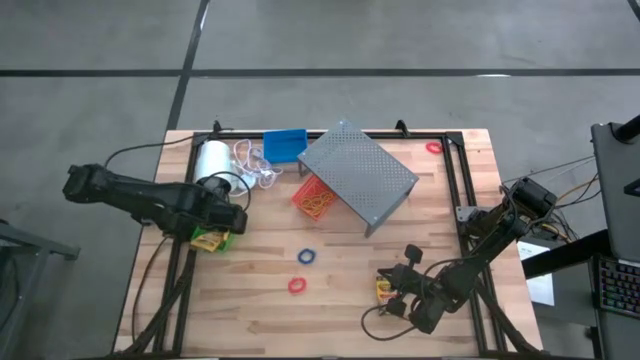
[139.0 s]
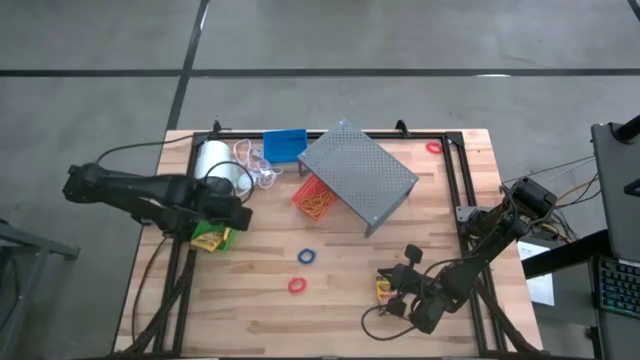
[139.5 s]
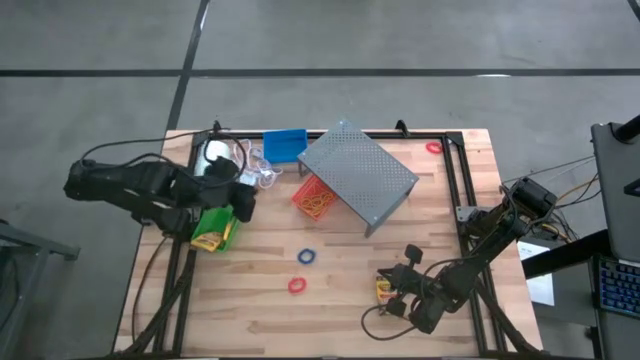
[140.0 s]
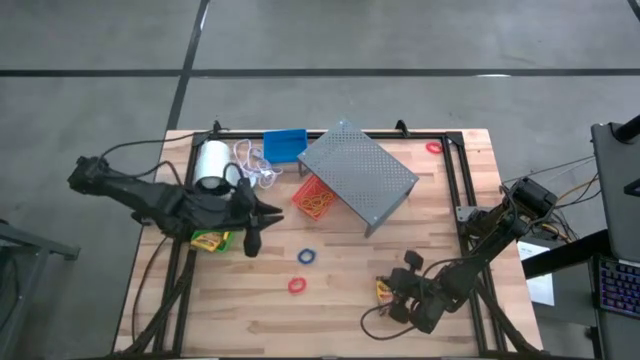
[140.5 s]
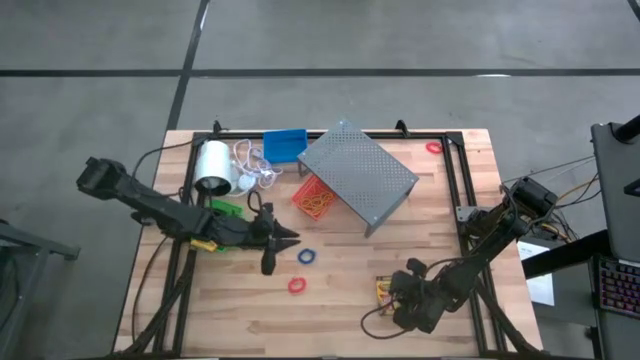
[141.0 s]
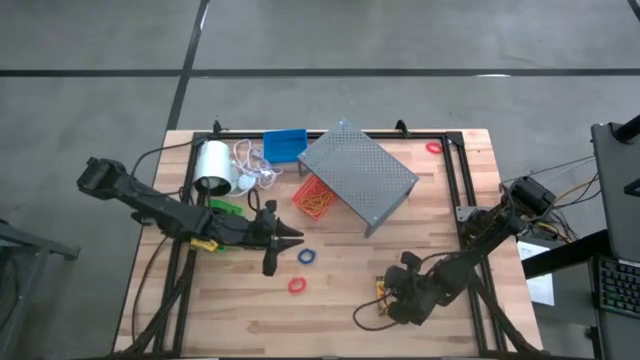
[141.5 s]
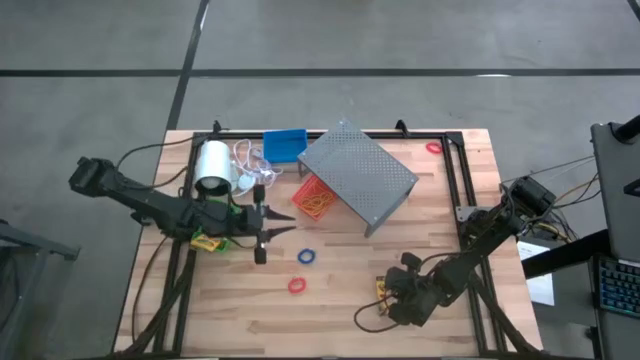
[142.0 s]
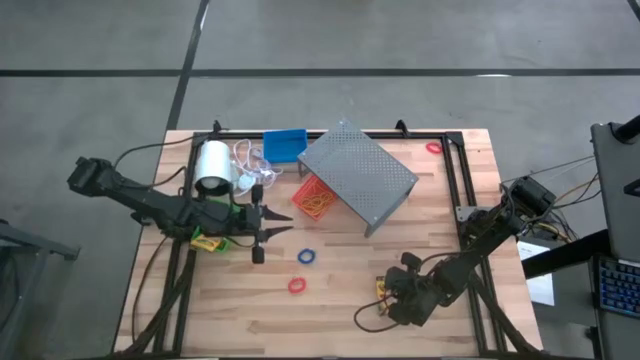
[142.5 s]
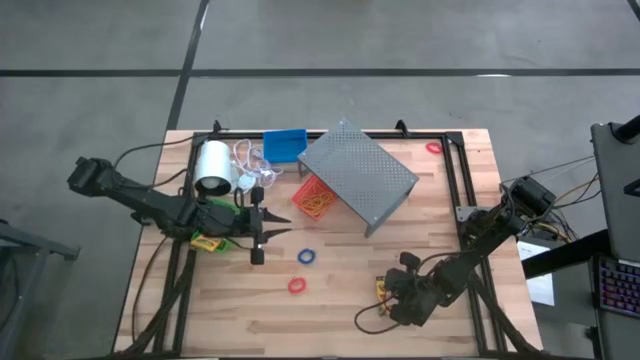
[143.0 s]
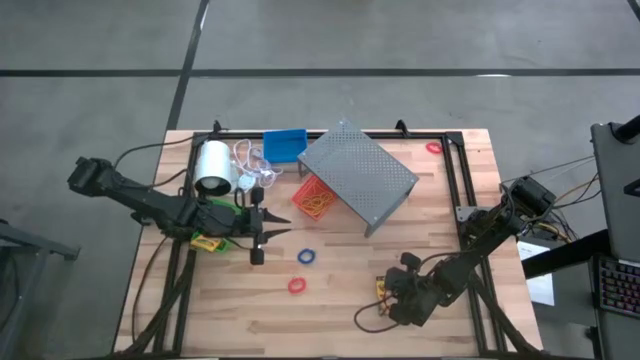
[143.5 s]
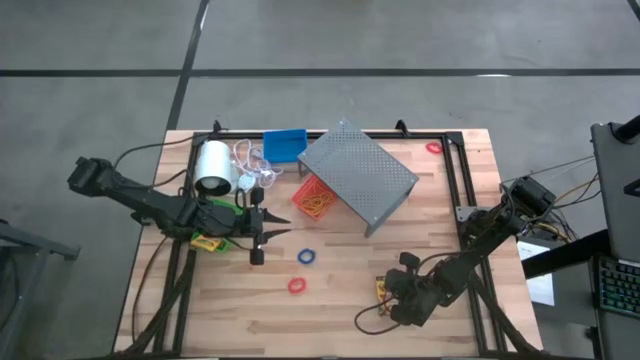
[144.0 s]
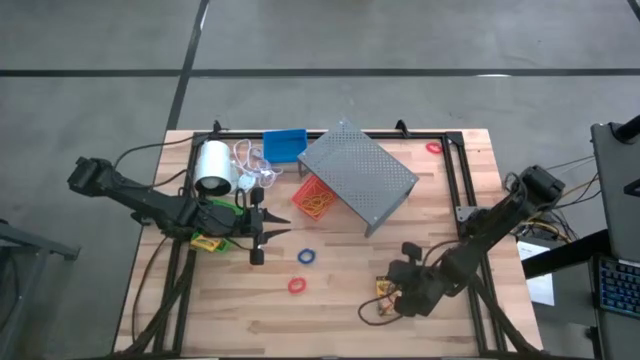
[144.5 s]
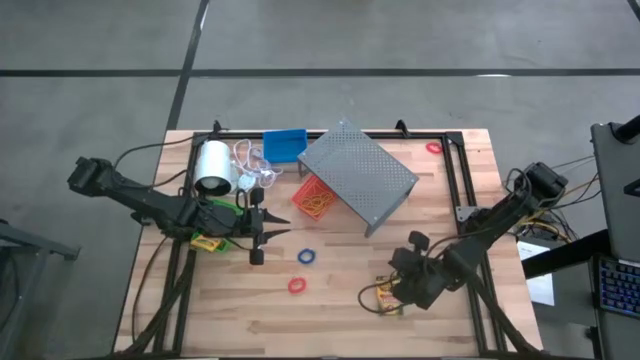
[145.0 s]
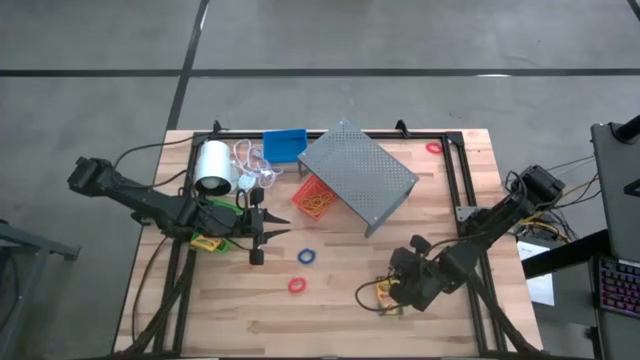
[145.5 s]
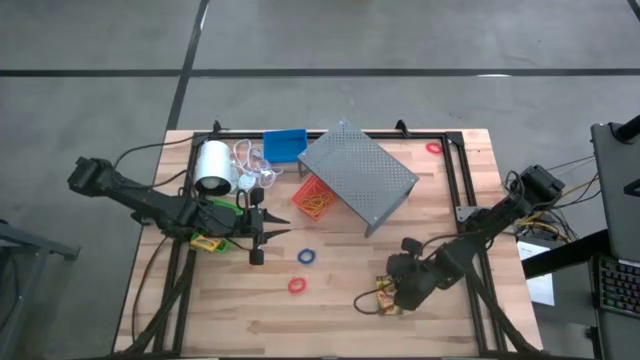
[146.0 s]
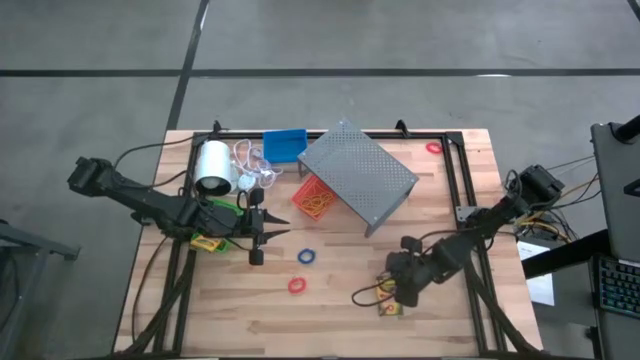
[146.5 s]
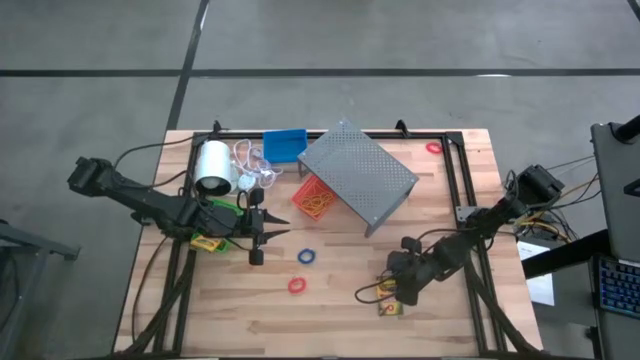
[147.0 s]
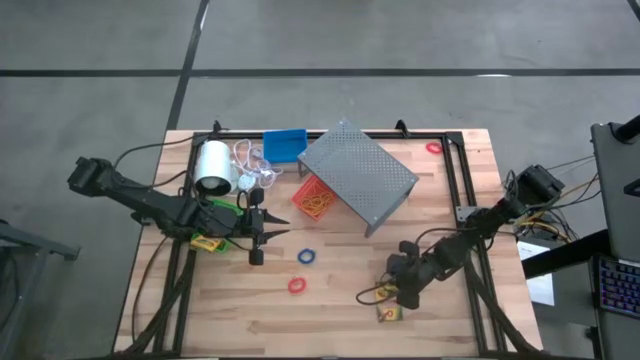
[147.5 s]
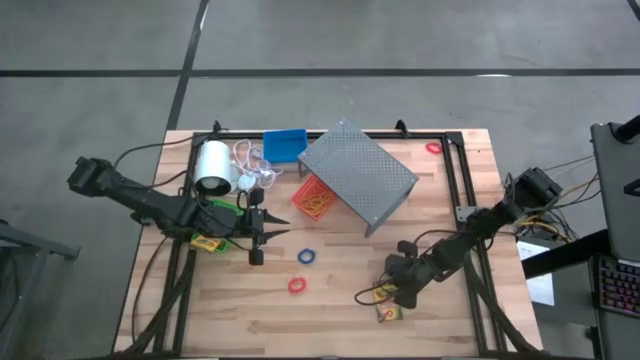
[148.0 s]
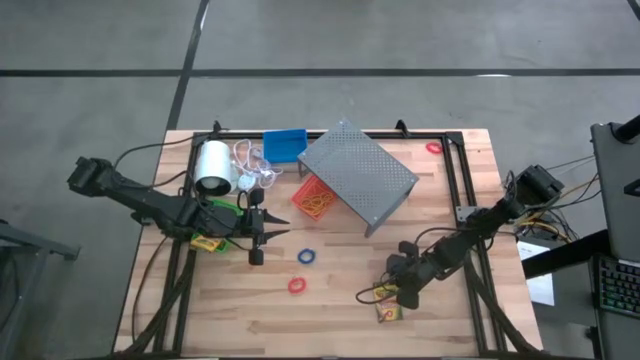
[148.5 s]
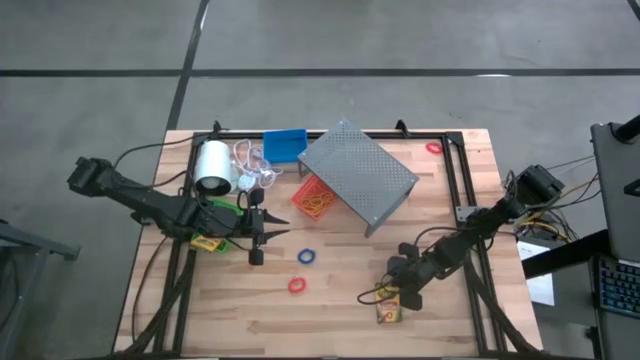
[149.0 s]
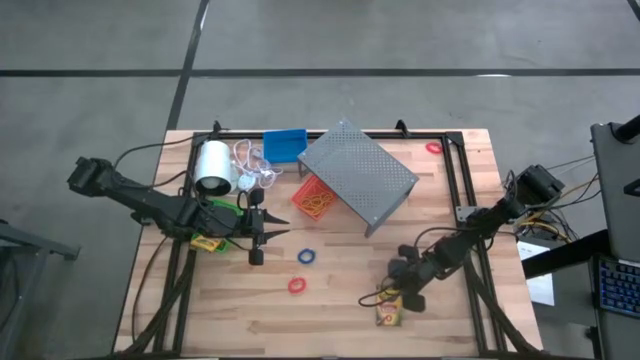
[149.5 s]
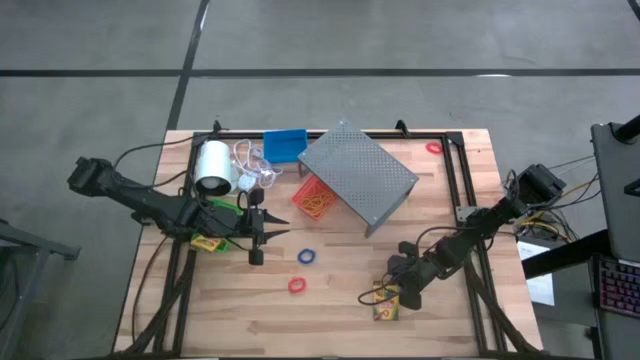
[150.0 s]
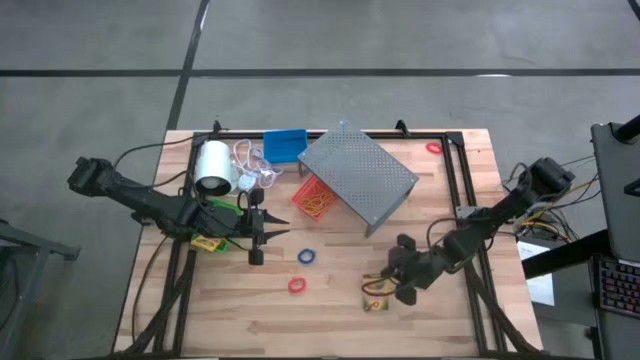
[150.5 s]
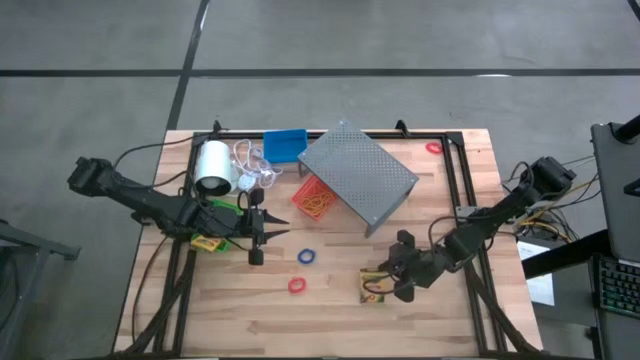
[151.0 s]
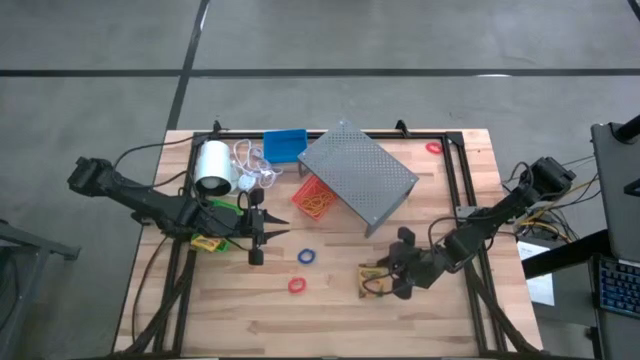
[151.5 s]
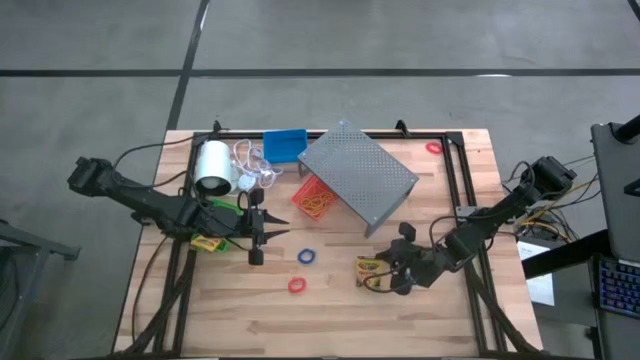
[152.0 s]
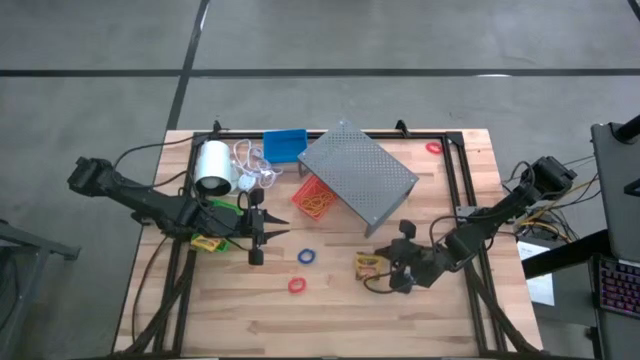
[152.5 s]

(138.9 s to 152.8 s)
Task: Pick & Place Office Desk Supplies
Put the crayon box into the green bin

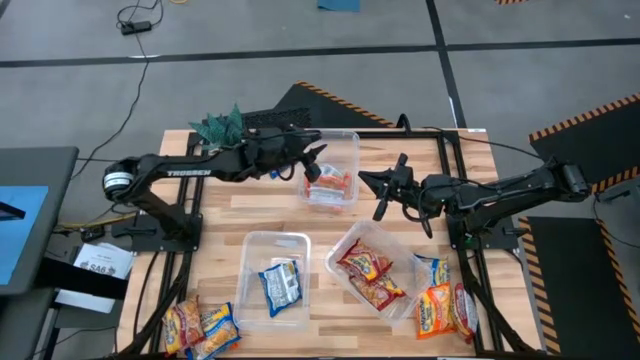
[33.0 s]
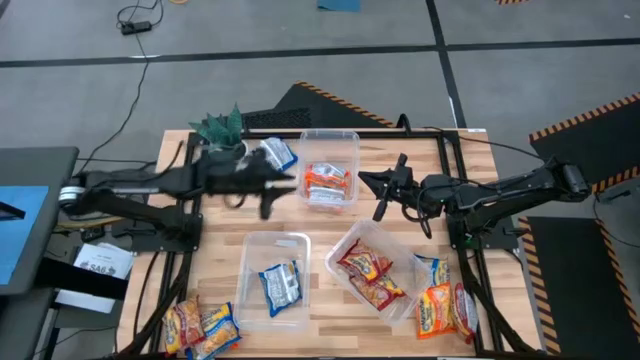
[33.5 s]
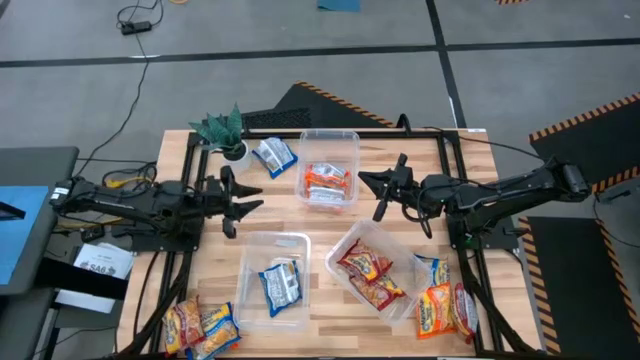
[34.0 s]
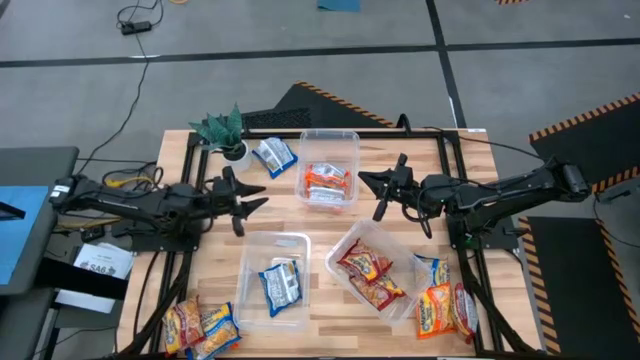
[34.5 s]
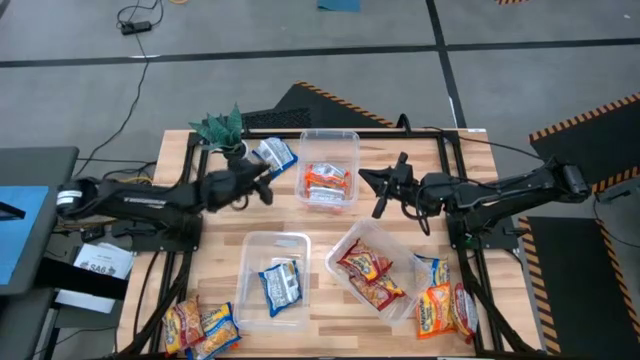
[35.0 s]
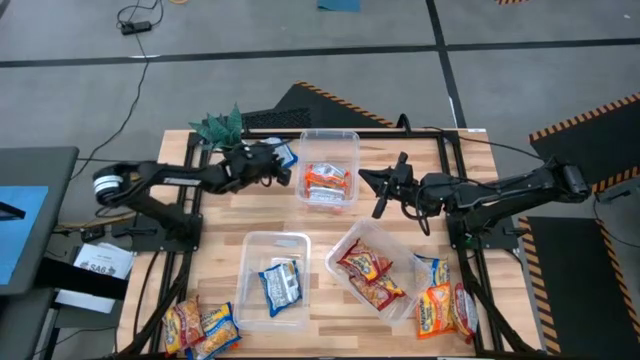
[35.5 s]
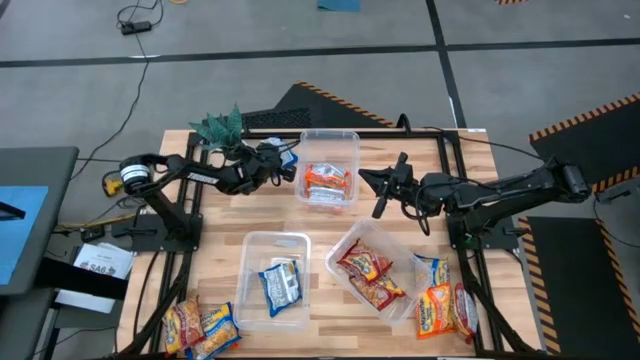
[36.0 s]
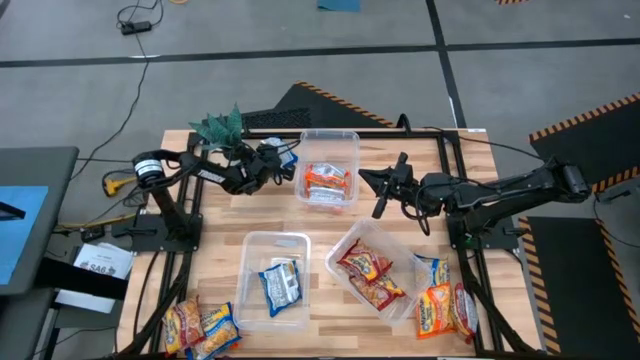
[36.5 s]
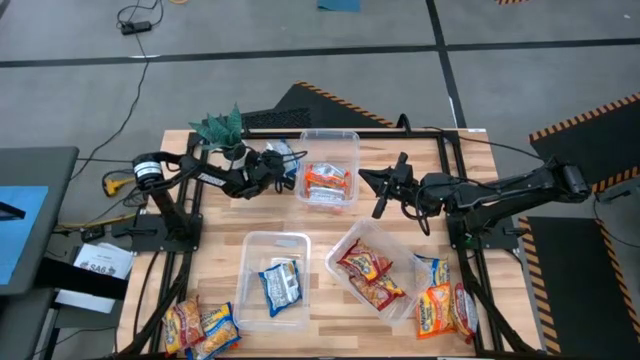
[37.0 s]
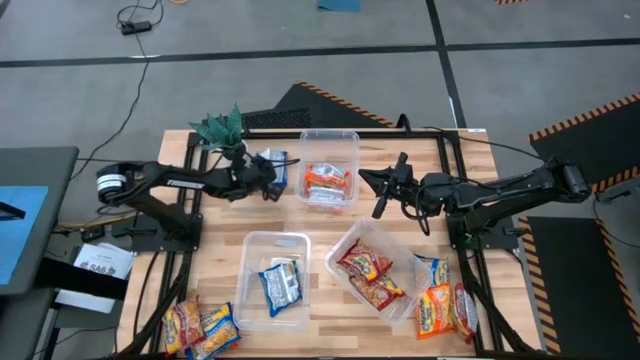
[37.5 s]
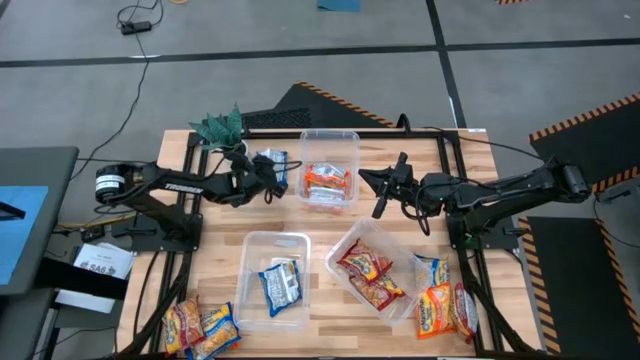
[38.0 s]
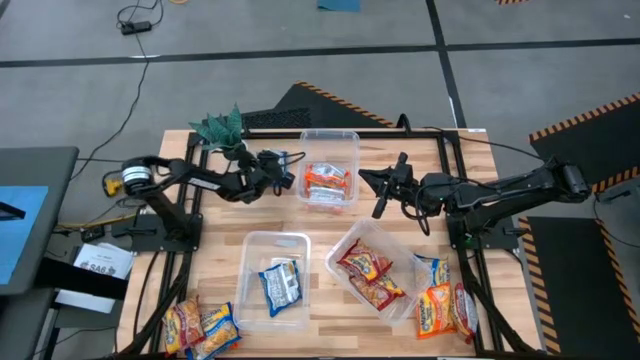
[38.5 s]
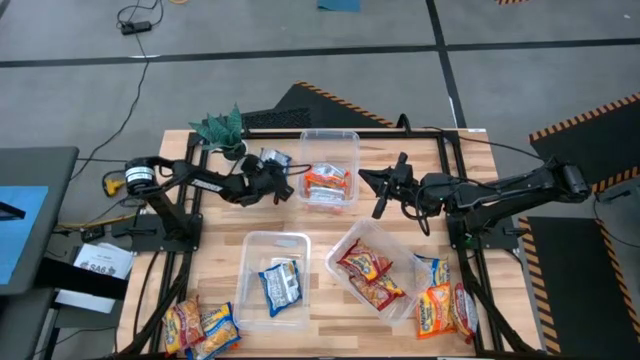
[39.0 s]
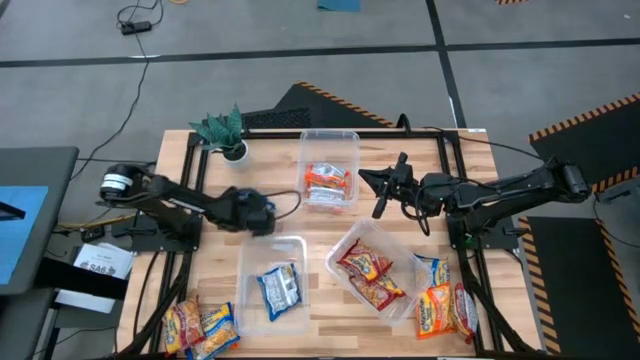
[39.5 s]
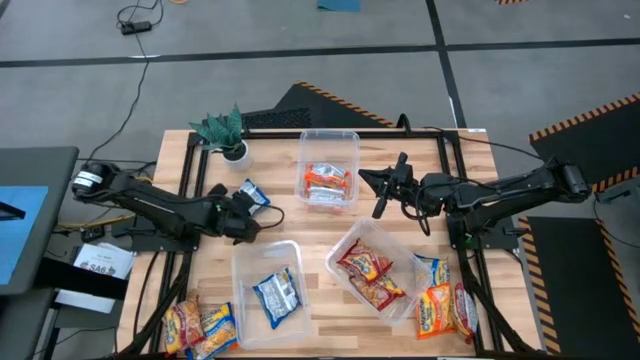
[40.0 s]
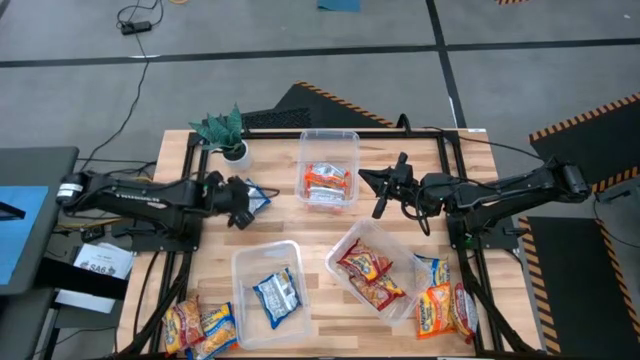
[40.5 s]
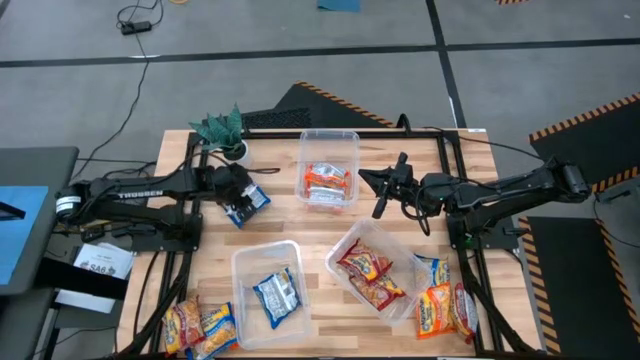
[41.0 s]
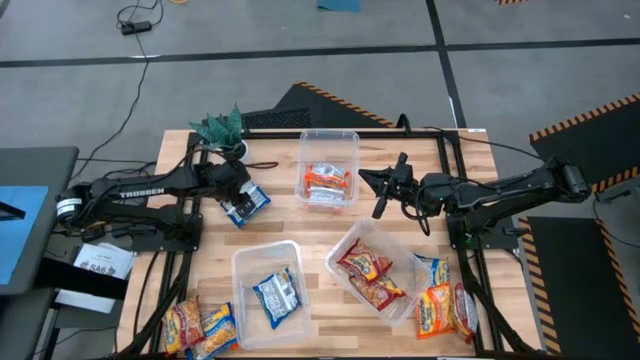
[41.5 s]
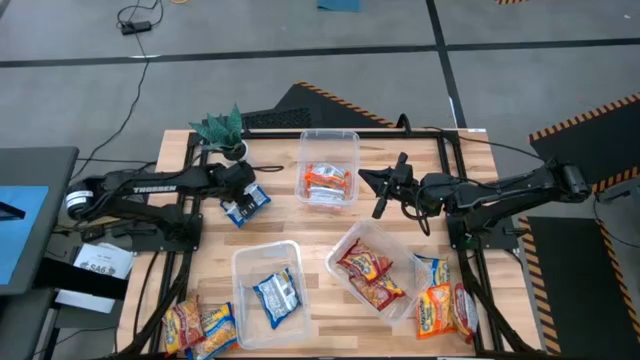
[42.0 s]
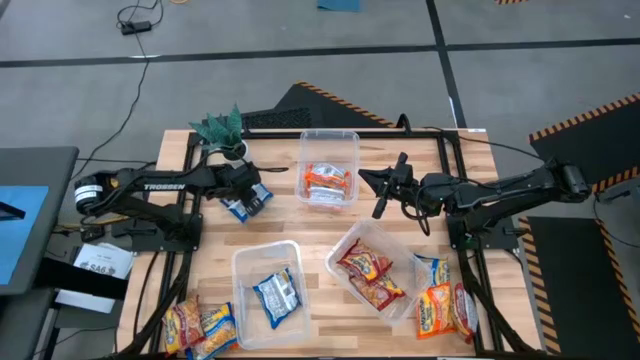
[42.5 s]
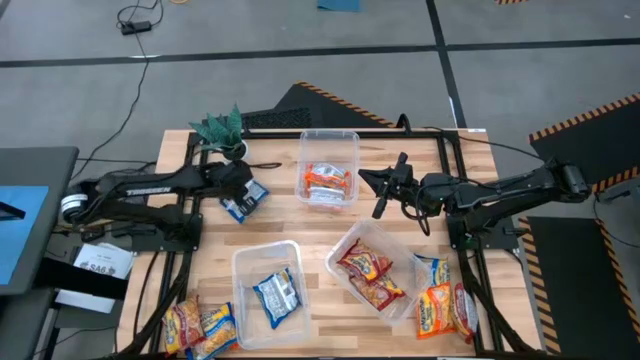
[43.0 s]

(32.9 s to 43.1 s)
Task: Sort Maruchan noodles
Put the blue noodle pack into the bottom left transparent bin
